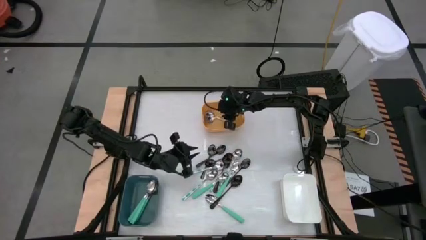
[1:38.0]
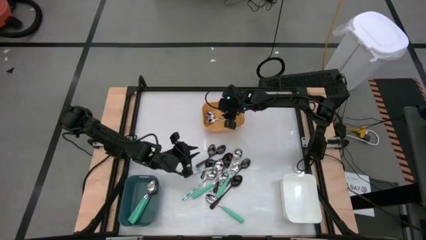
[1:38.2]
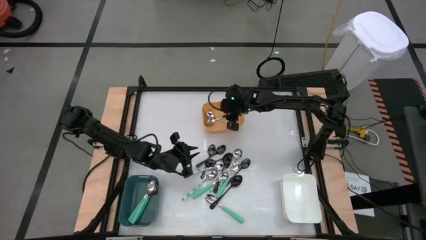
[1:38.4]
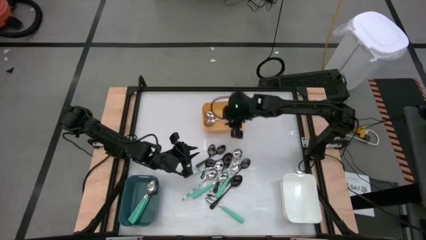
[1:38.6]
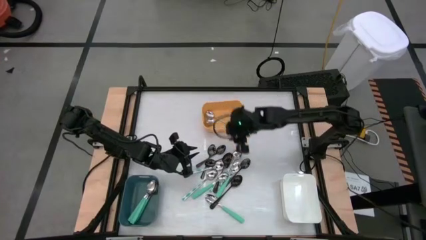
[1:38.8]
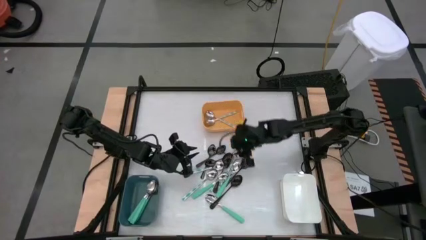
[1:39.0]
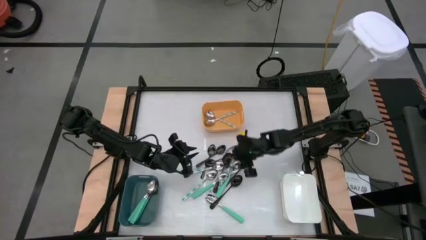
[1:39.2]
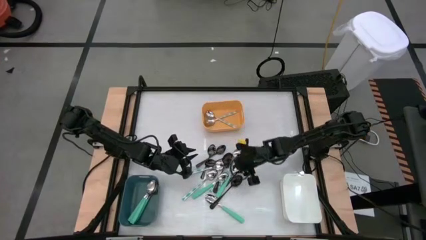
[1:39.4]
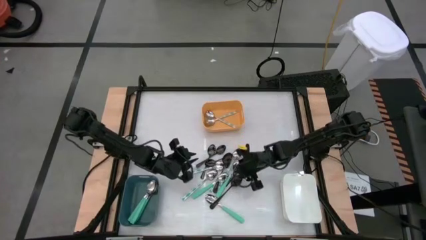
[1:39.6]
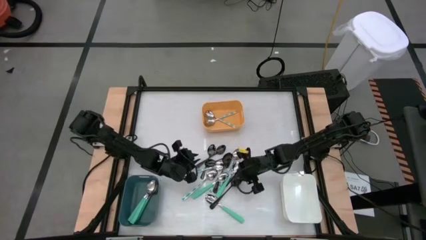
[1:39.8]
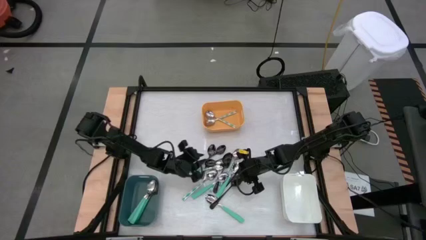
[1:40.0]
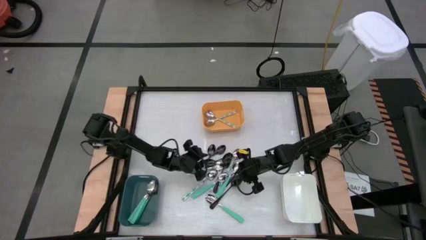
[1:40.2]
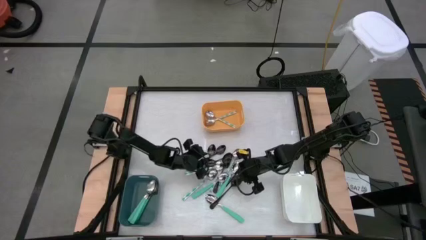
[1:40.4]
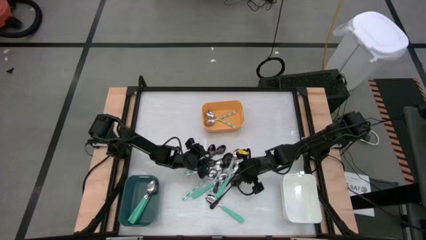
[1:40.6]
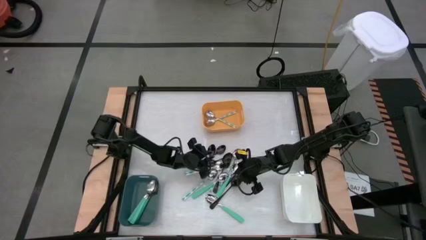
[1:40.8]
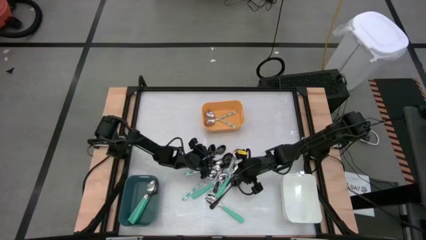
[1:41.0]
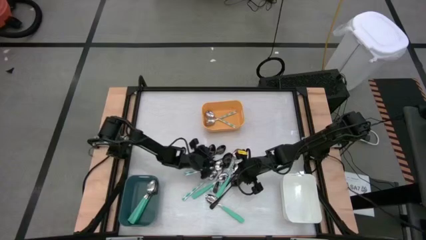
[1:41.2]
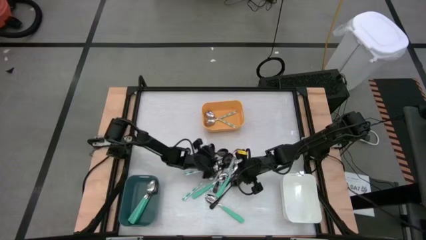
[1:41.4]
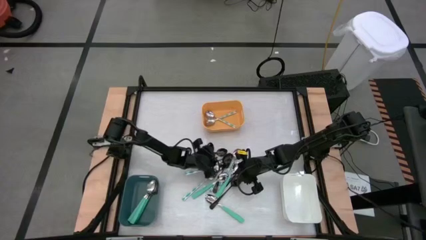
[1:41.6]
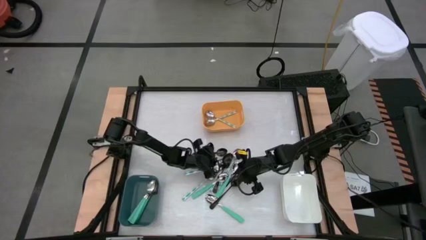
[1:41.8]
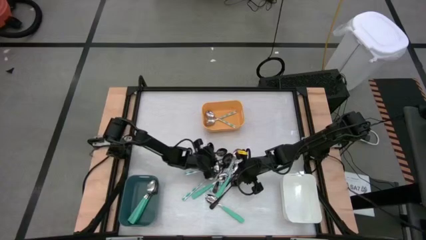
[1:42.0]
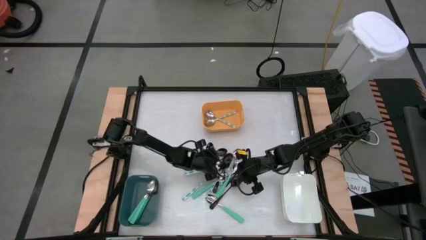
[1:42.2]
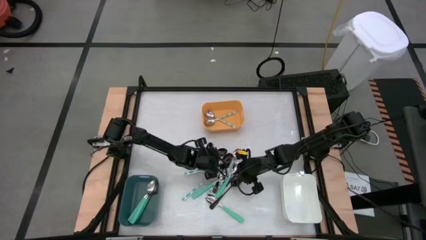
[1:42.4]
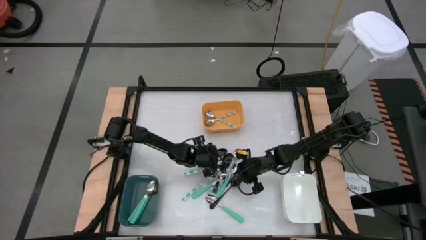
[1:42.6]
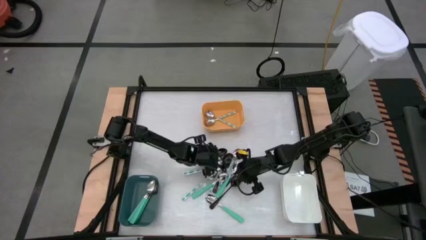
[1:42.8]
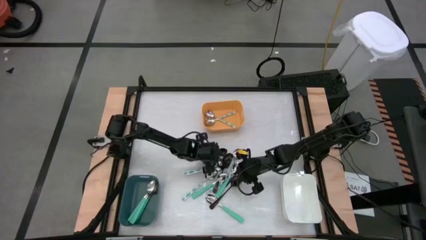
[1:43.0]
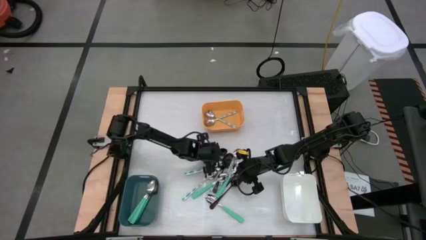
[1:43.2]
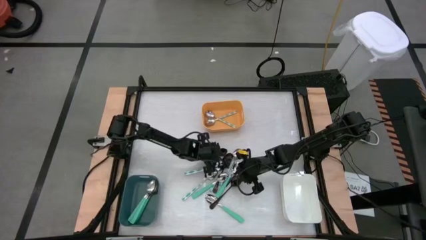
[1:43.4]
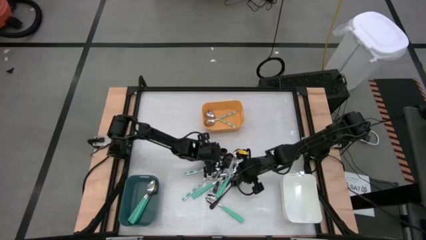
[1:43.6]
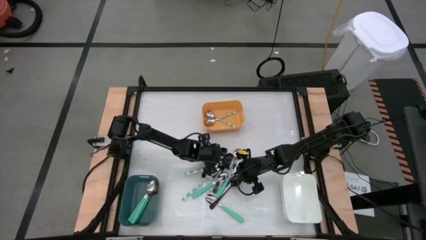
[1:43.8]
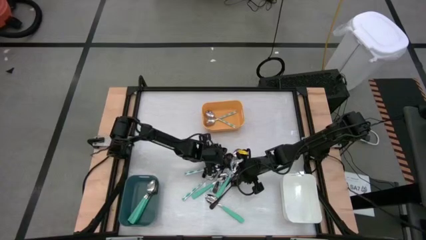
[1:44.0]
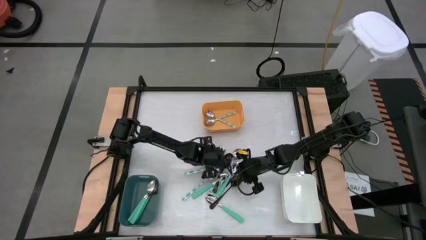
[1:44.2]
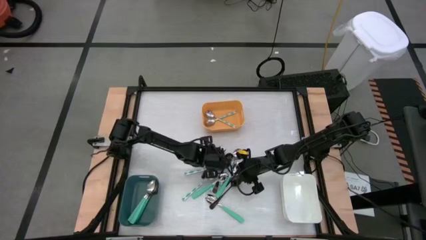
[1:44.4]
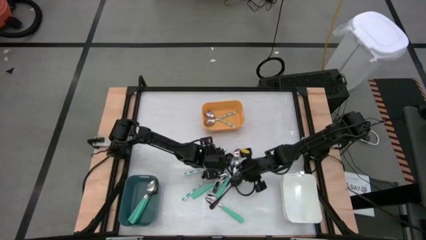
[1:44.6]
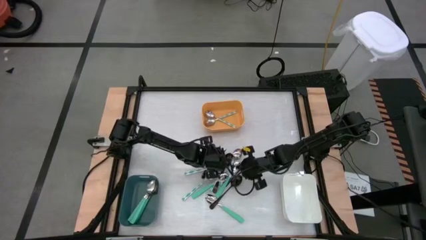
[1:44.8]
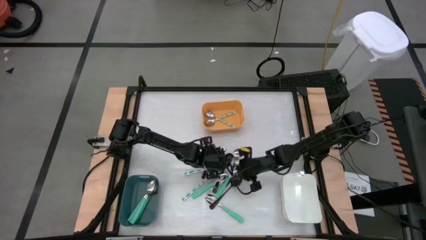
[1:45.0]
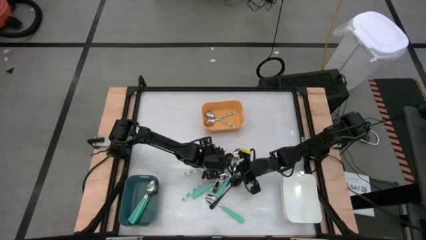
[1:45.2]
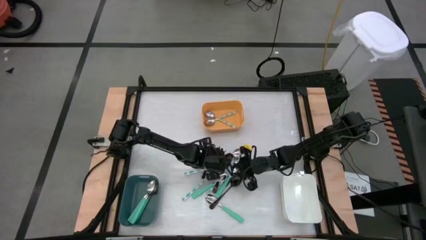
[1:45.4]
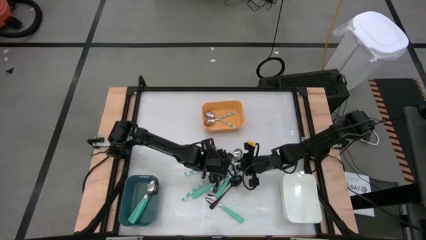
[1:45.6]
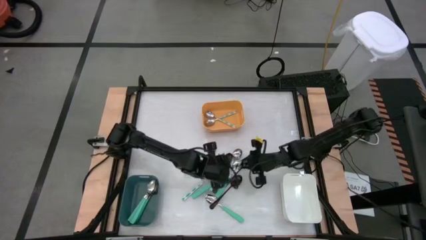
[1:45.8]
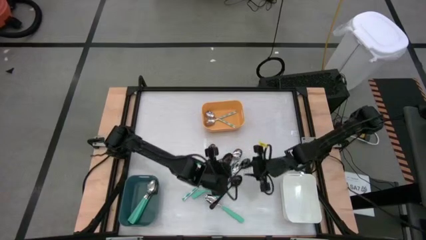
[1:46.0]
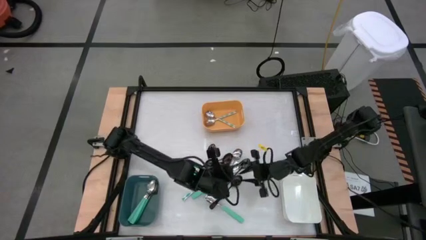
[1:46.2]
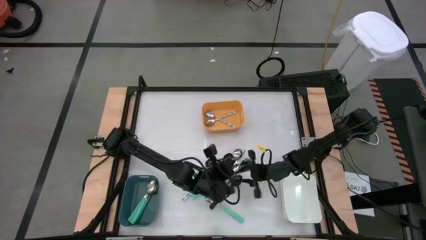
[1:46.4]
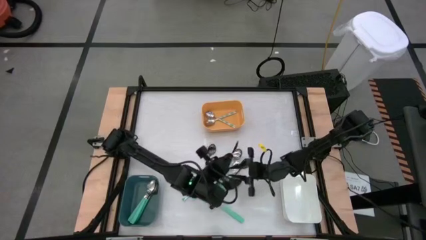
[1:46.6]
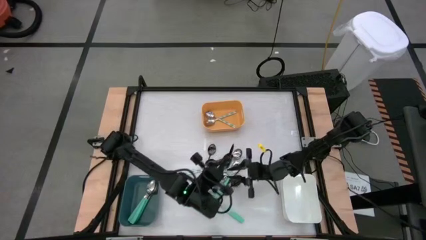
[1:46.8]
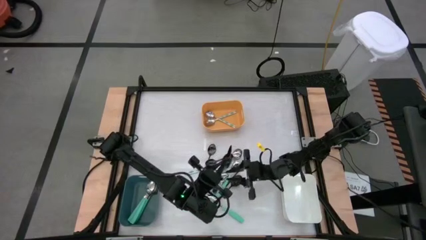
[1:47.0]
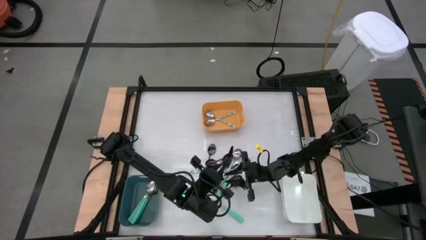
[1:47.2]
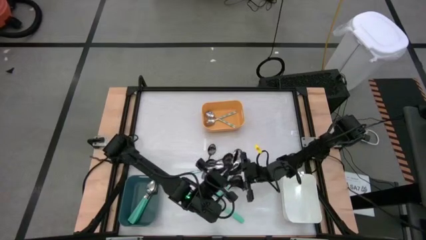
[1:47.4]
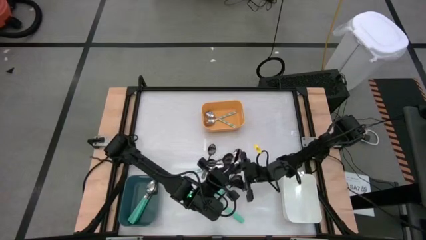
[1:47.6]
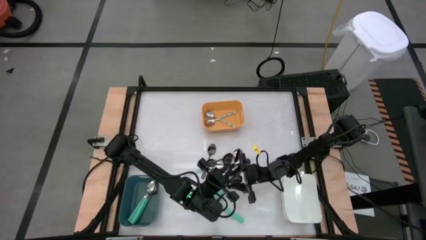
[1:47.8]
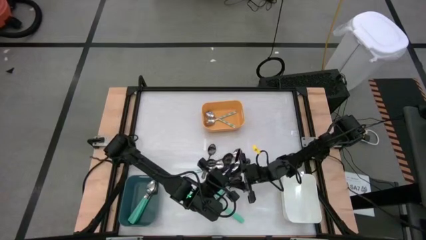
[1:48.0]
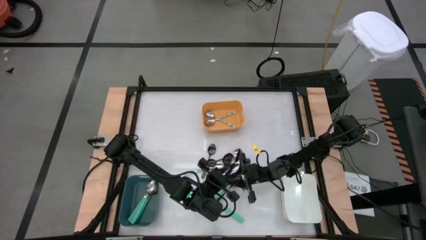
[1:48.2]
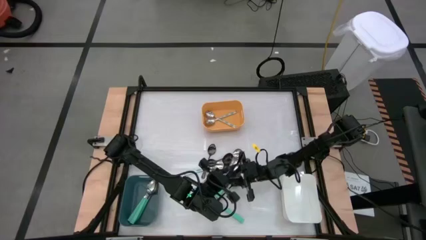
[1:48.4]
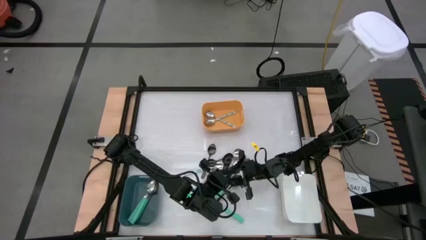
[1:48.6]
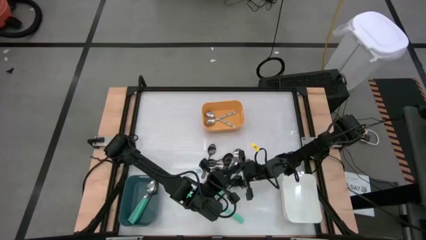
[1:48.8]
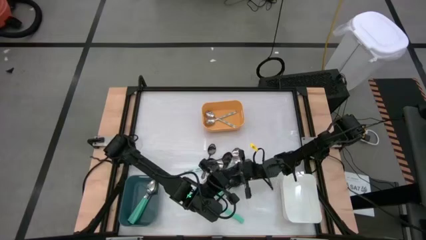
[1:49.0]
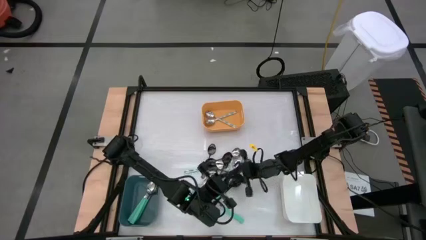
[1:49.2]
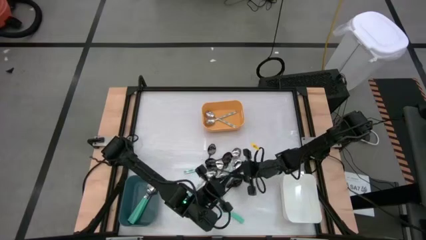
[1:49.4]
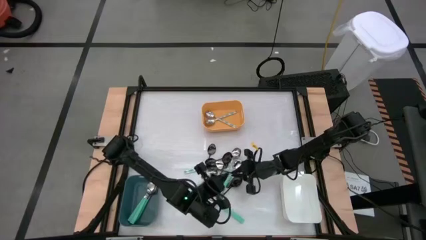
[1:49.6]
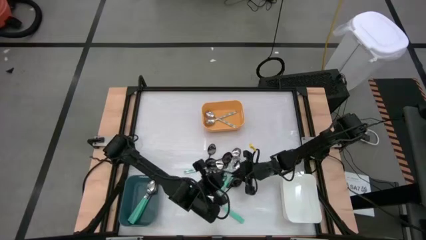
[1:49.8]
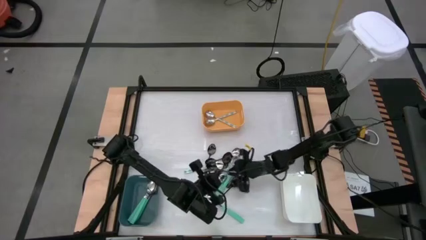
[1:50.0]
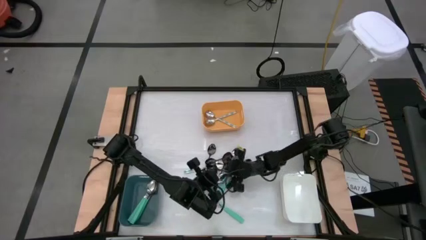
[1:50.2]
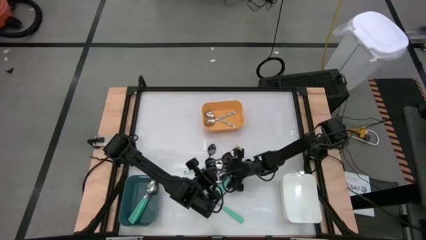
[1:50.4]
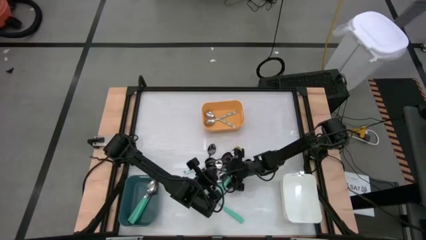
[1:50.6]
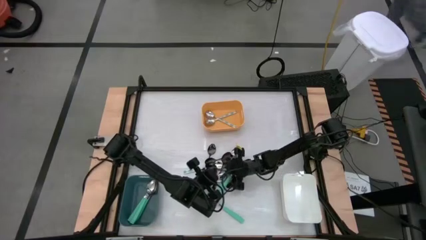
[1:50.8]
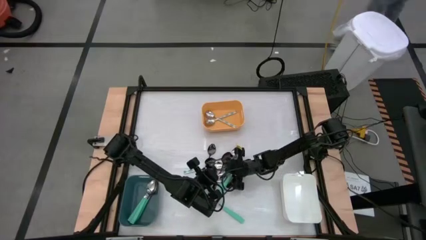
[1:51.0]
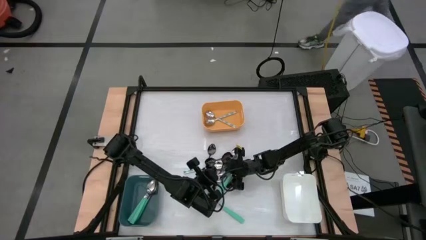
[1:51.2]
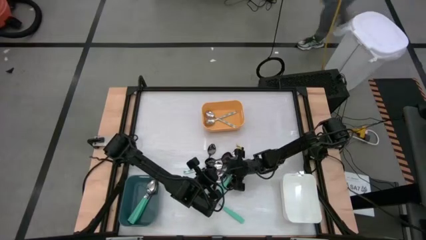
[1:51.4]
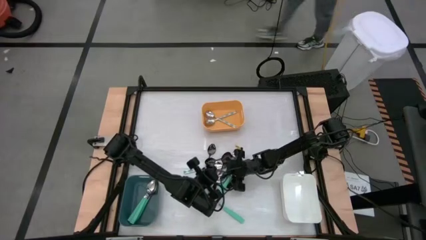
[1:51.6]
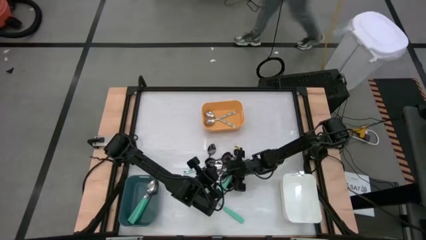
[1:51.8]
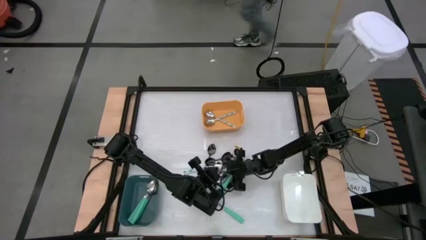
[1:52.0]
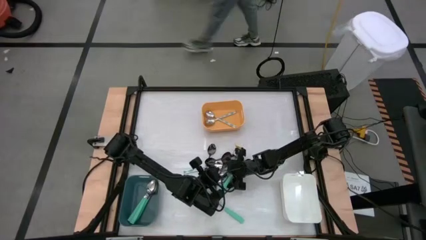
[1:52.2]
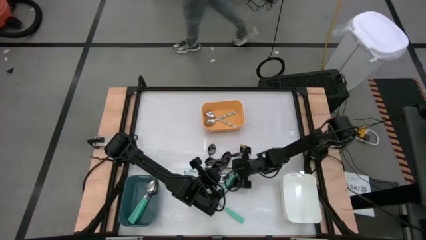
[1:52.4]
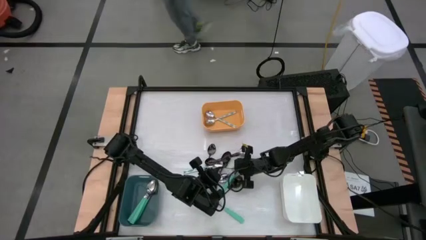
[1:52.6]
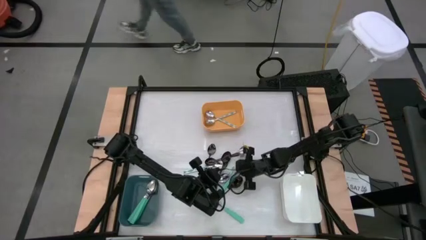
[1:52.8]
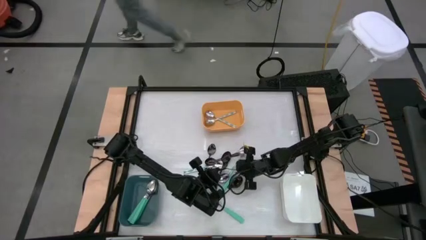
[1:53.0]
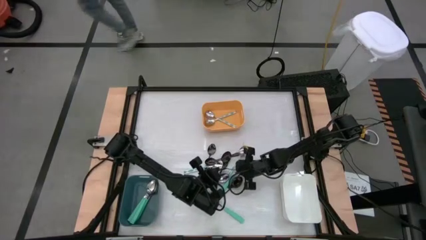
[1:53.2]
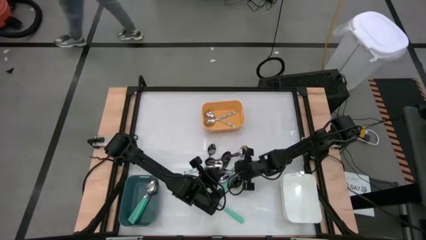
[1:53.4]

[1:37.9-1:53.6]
Task: Sort silverware by color (type)
Put the black spoon into the white bin
